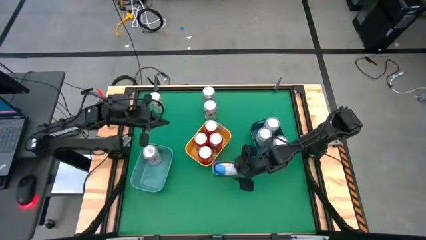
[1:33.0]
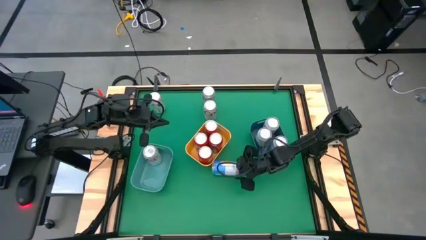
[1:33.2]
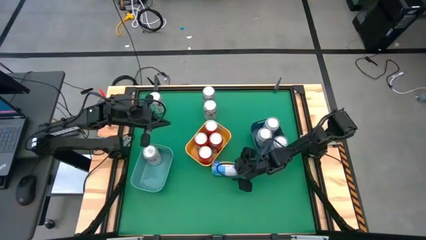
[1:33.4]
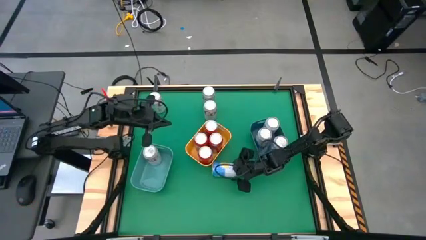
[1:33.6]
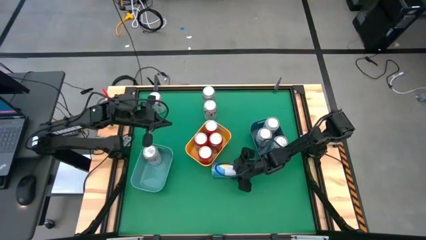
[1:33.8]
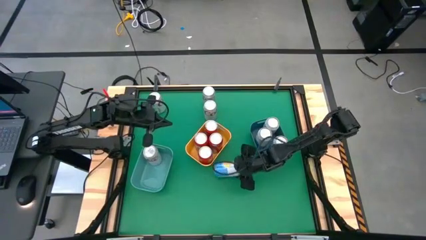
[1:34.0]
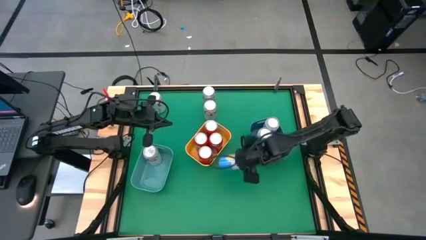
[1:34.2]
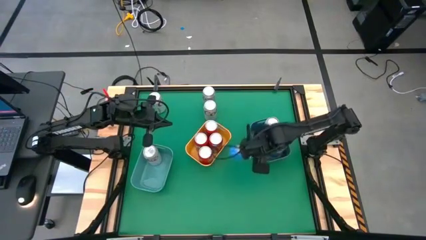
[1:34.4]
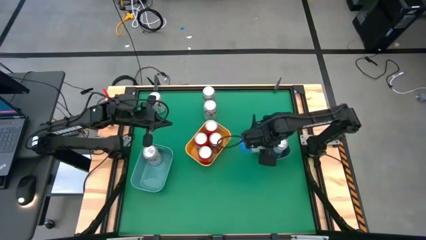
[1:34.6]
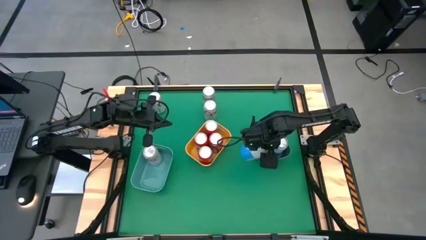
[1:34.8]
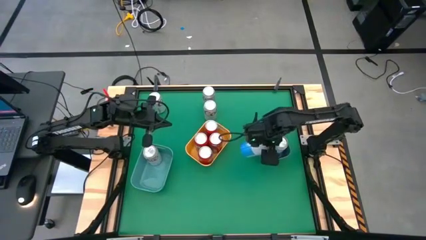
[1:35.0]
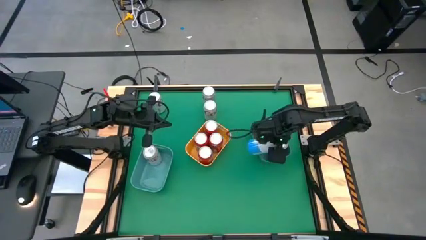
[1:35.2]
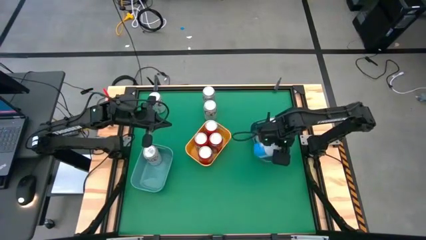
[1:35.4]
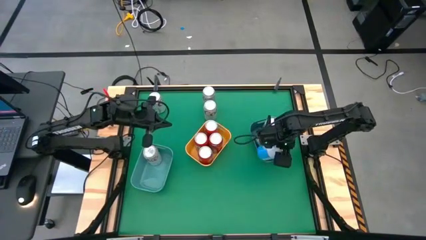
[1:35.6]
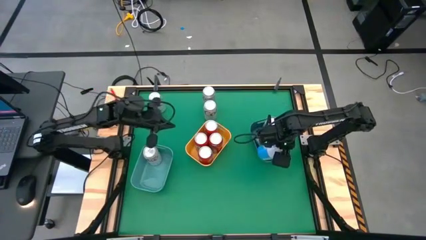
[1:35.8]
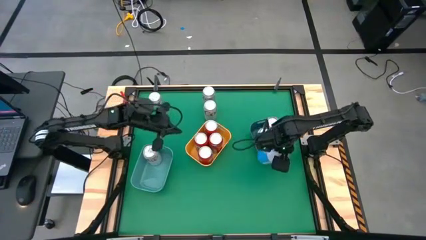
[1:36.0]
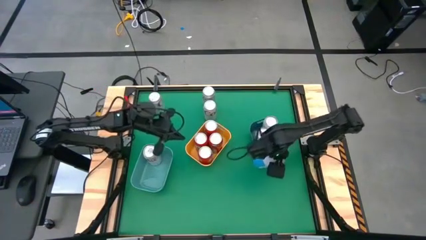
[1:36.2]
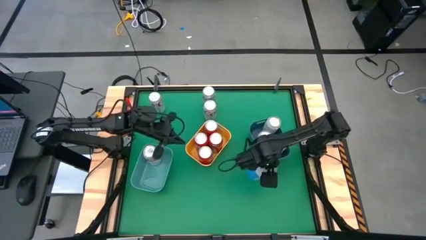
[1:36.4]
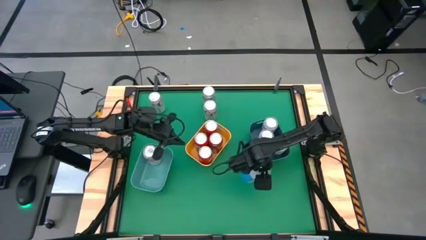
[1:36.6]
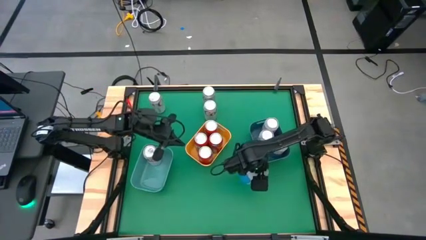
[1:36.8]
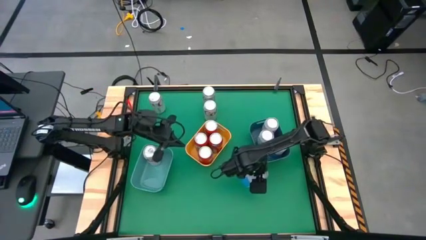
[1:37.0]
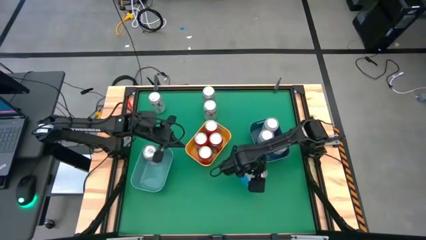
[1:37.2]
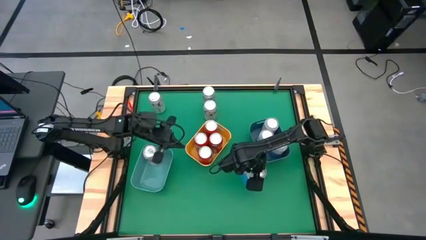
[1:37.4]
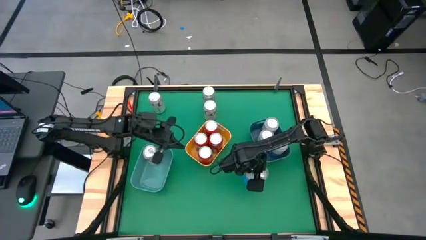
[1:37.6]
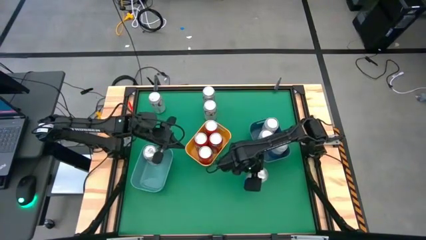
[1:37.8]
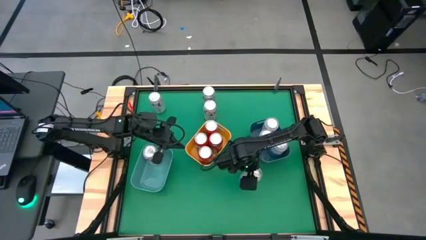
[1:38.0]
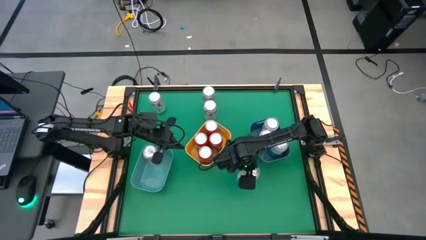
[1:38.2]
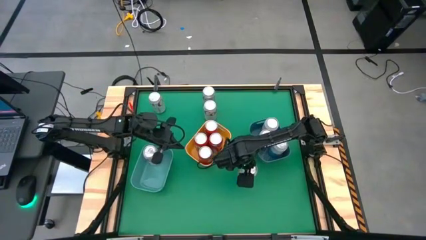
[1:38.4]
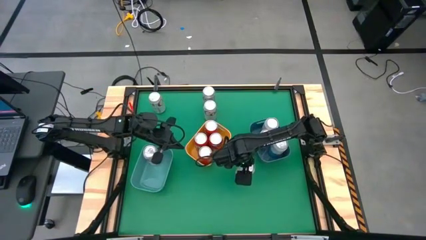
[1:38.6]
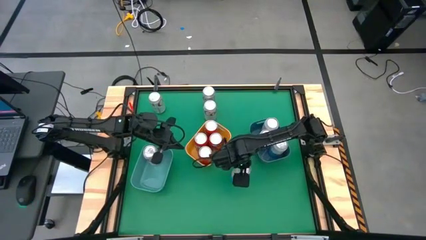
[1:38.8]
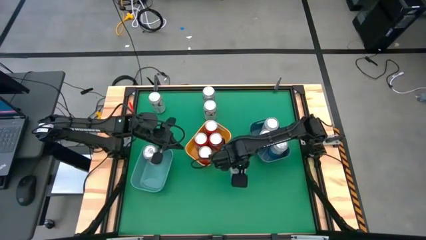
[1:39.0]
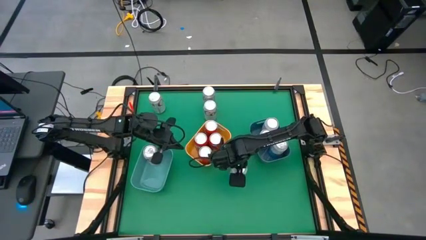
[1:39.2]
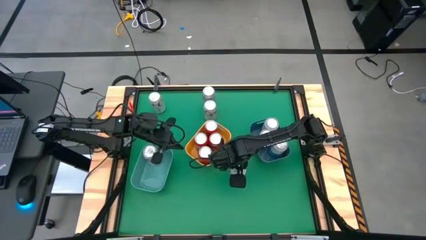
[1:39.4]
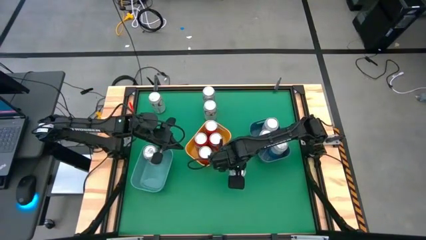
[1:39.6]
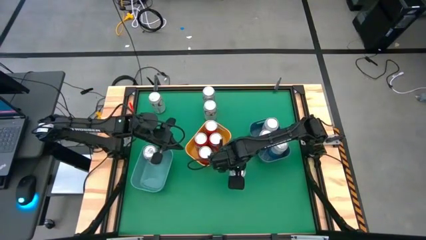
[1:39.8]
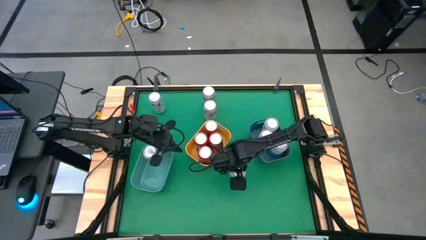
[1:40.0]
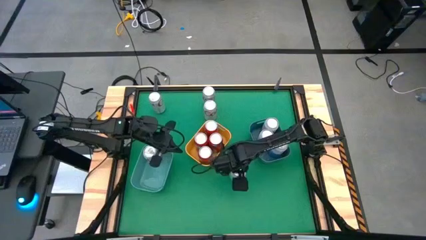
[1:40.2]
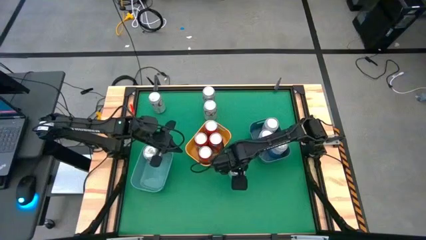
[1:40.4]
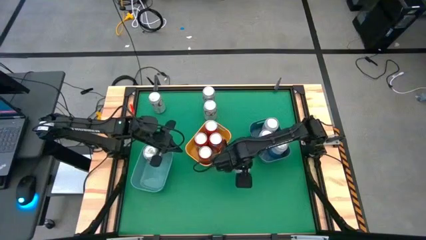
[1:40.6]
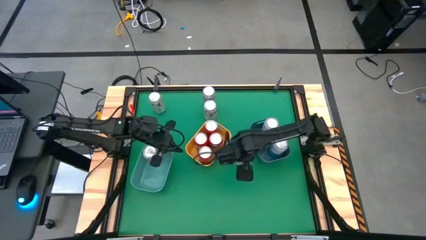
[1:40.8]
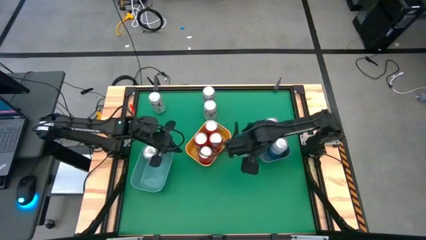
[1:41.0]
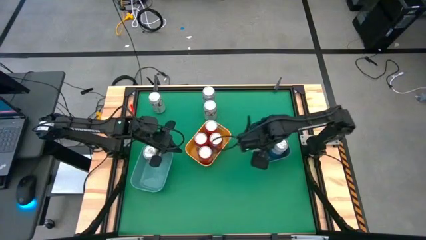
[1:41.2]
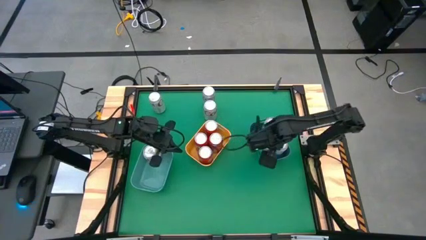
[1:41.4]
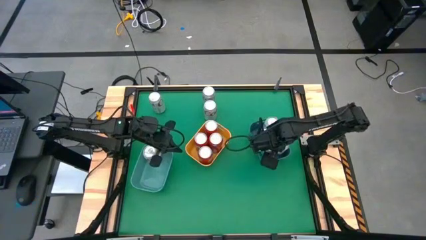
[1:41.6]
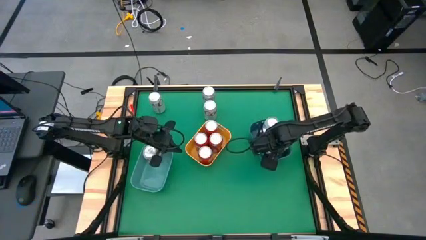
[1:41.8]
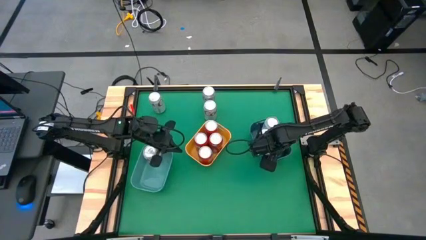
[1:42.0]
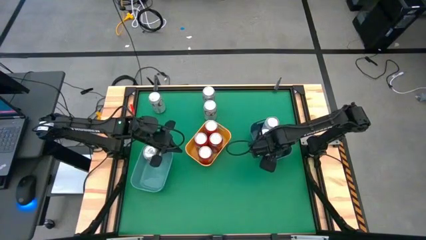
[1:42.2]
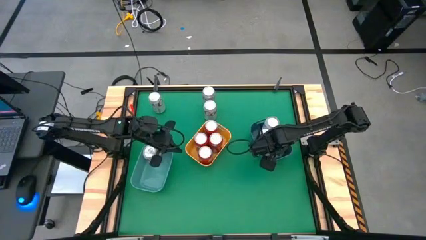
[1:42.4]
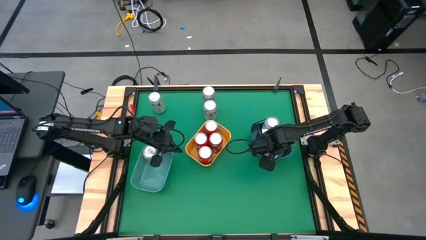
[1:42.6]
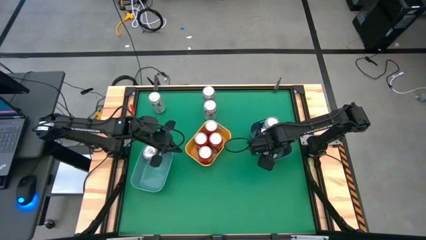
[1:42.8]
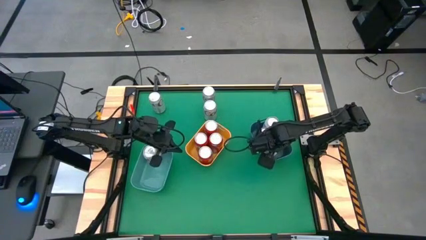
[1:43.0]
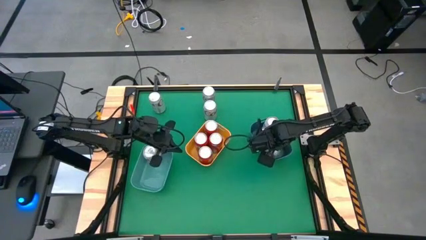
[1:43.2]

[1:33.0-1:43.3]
Task: Sort soda cans
Put the blue and white soda can into the blue bin
